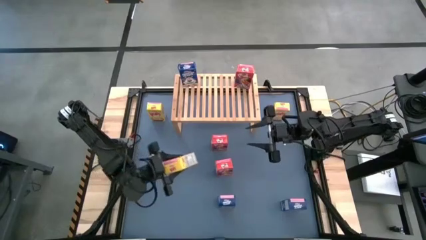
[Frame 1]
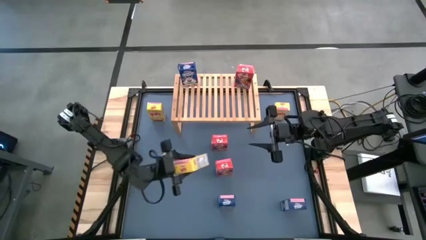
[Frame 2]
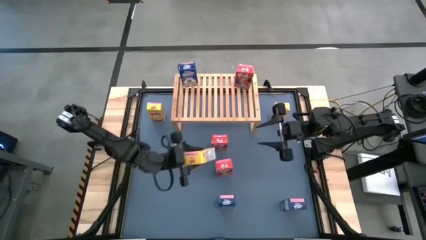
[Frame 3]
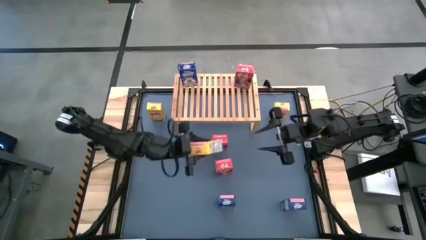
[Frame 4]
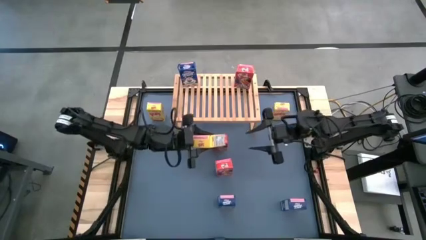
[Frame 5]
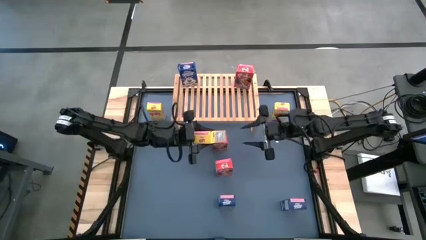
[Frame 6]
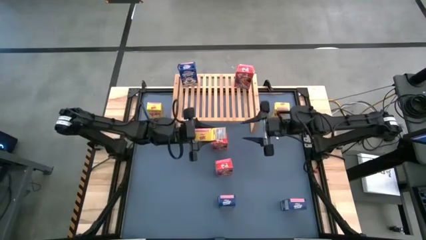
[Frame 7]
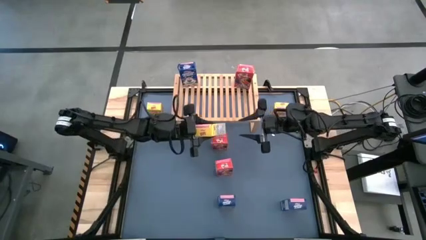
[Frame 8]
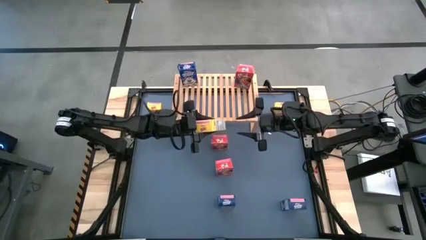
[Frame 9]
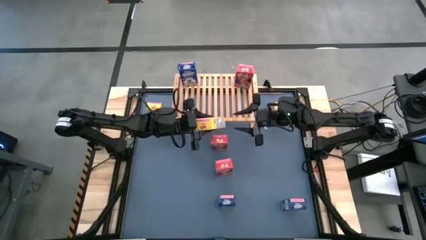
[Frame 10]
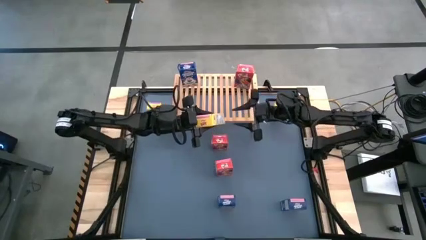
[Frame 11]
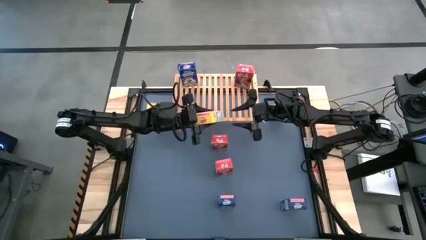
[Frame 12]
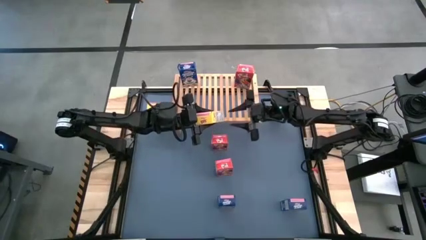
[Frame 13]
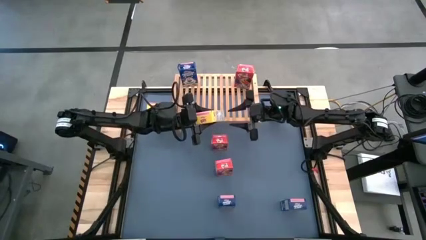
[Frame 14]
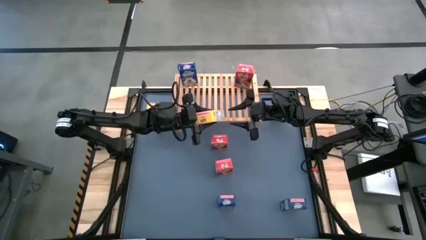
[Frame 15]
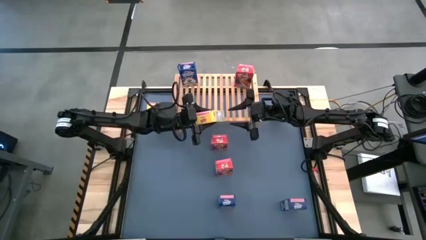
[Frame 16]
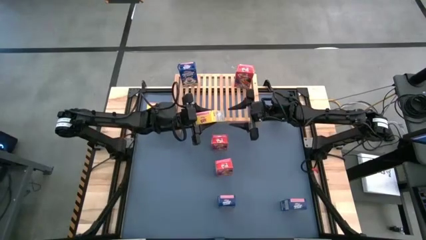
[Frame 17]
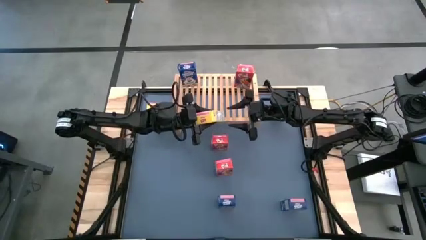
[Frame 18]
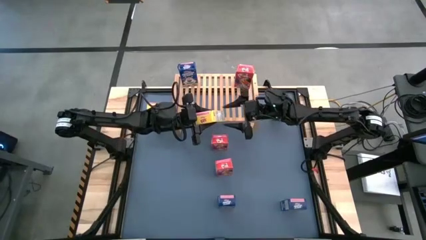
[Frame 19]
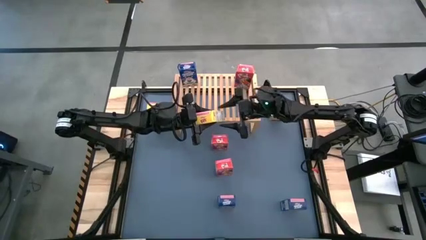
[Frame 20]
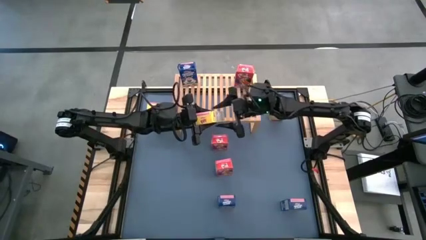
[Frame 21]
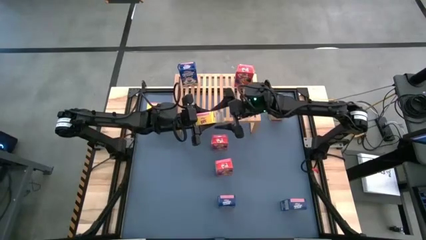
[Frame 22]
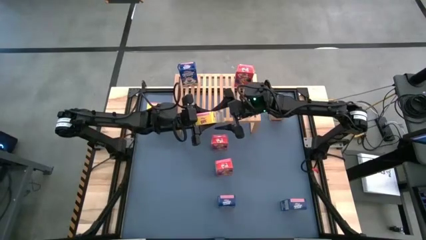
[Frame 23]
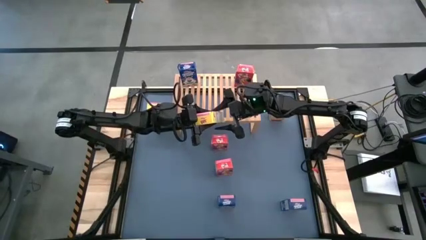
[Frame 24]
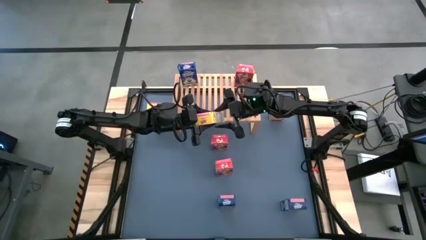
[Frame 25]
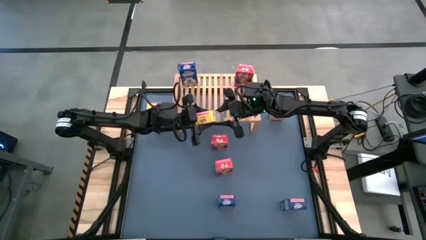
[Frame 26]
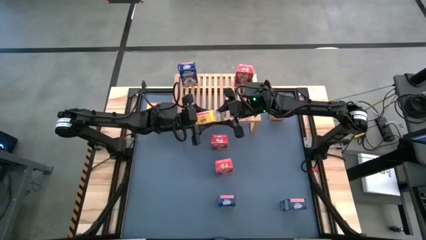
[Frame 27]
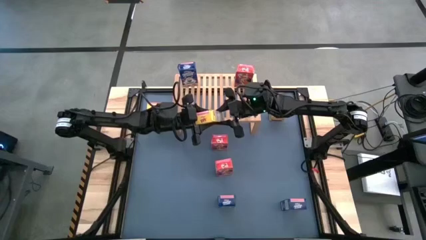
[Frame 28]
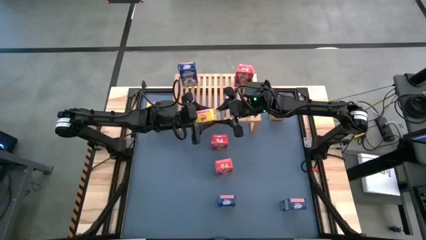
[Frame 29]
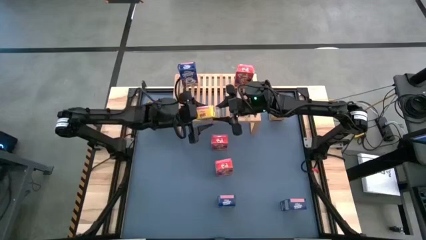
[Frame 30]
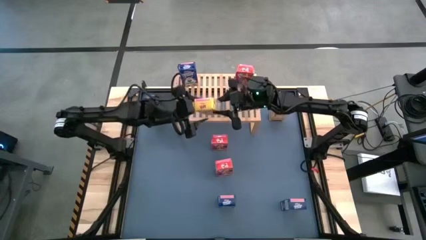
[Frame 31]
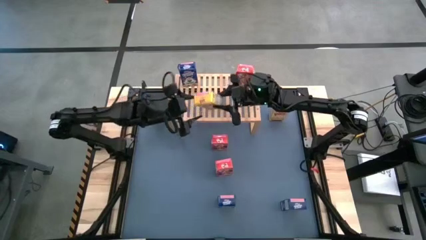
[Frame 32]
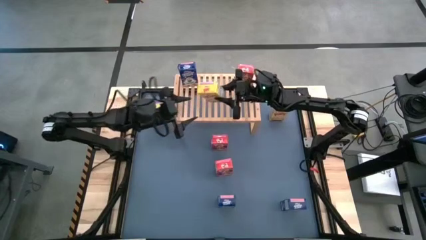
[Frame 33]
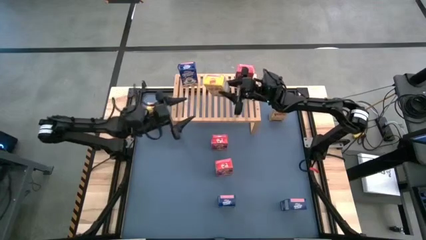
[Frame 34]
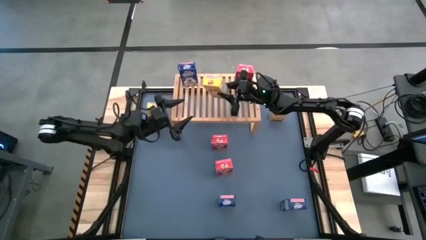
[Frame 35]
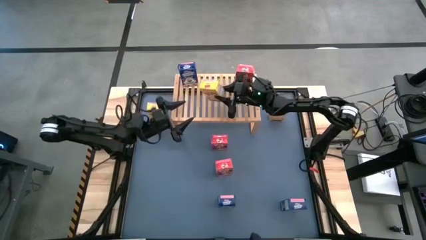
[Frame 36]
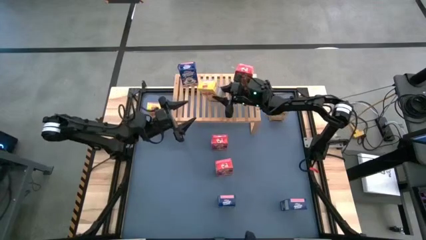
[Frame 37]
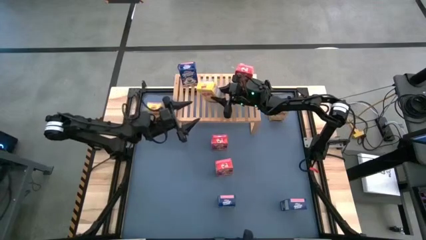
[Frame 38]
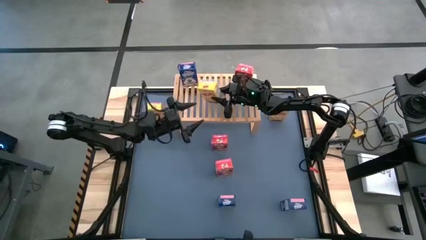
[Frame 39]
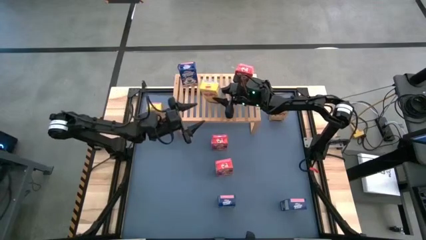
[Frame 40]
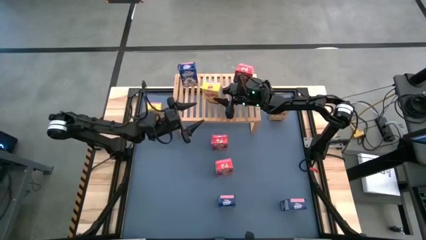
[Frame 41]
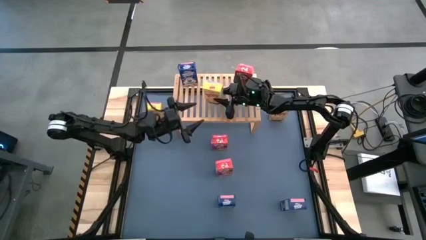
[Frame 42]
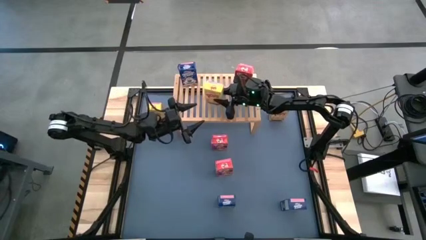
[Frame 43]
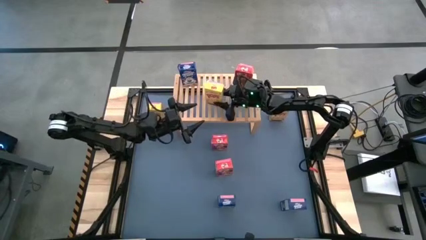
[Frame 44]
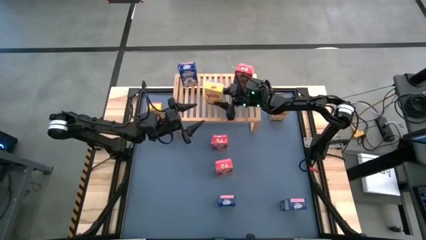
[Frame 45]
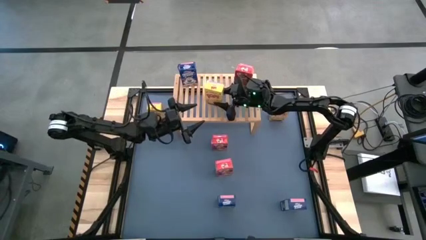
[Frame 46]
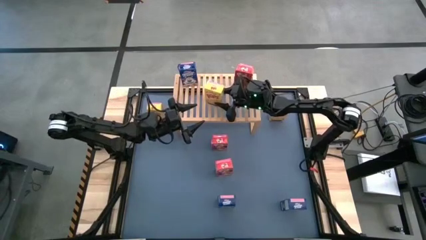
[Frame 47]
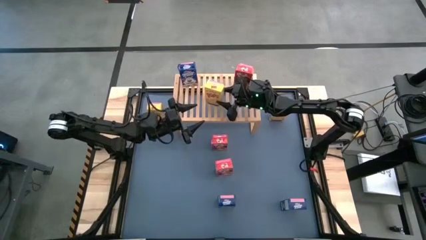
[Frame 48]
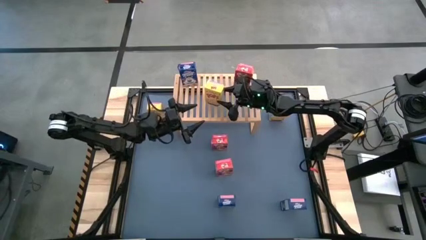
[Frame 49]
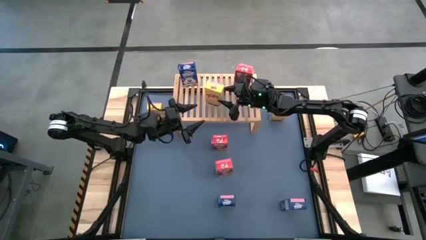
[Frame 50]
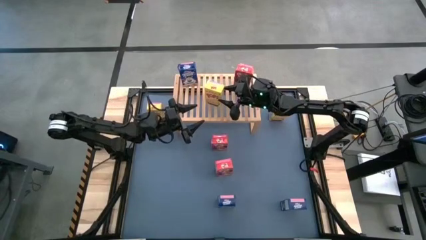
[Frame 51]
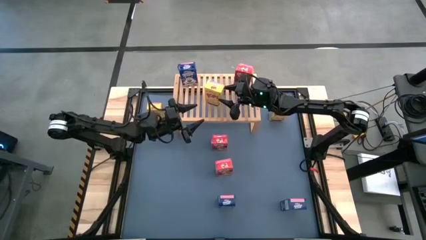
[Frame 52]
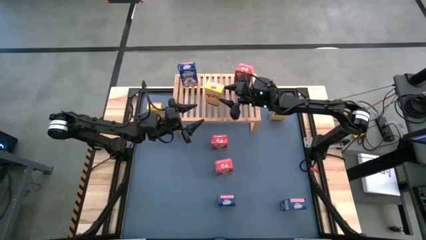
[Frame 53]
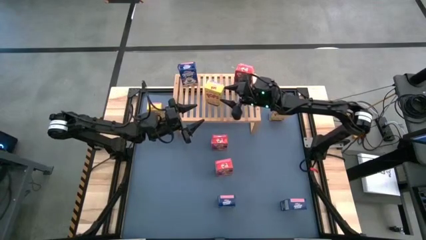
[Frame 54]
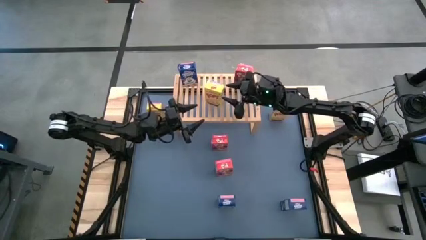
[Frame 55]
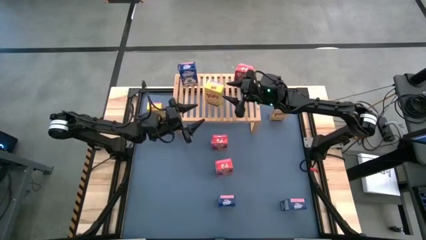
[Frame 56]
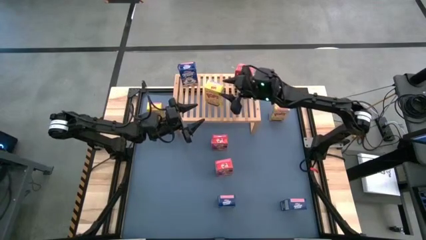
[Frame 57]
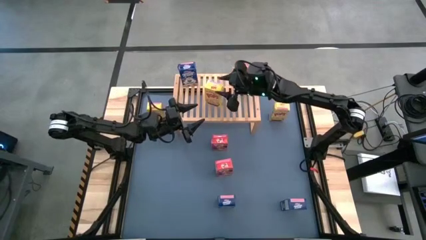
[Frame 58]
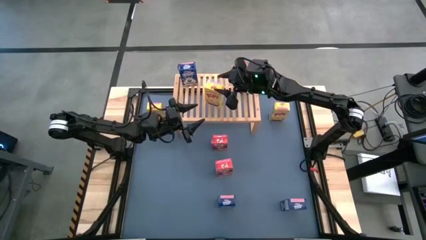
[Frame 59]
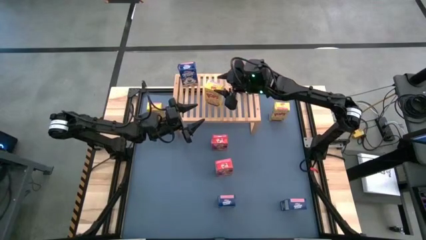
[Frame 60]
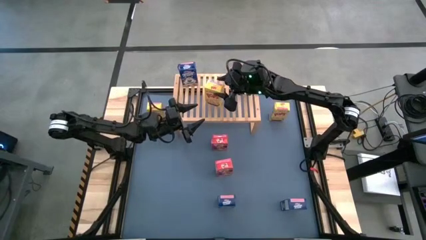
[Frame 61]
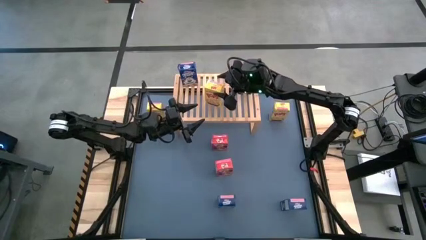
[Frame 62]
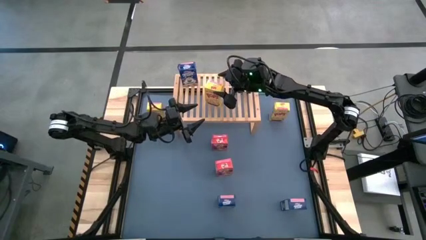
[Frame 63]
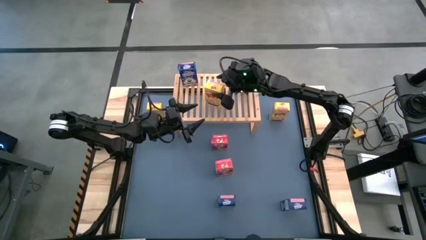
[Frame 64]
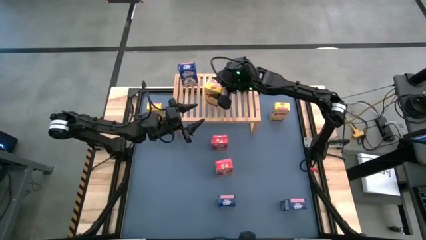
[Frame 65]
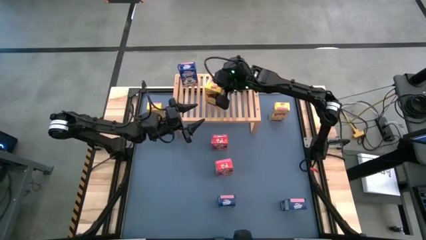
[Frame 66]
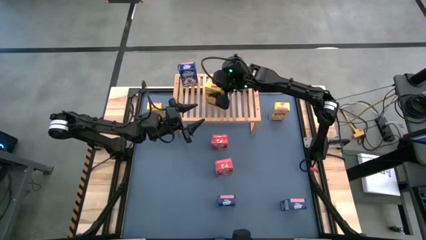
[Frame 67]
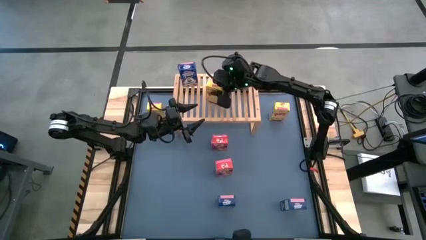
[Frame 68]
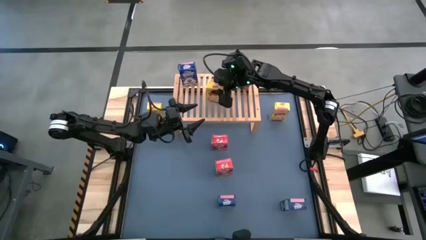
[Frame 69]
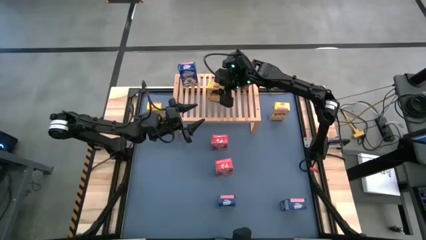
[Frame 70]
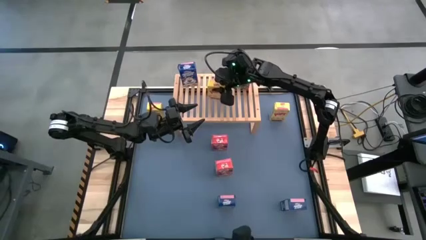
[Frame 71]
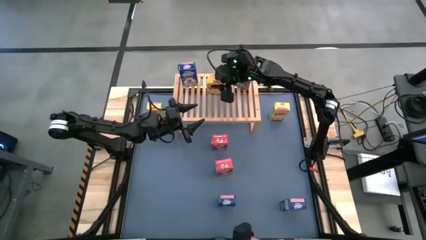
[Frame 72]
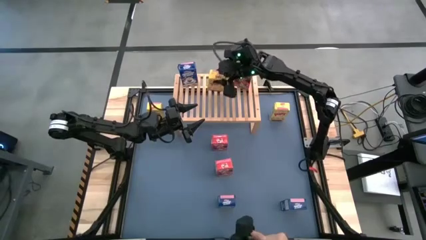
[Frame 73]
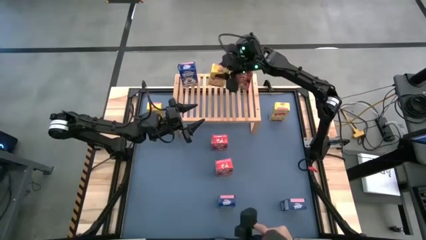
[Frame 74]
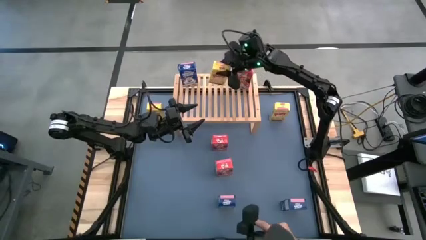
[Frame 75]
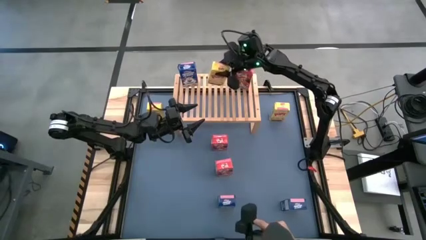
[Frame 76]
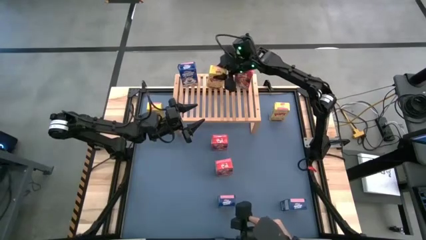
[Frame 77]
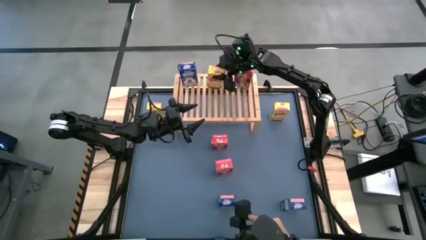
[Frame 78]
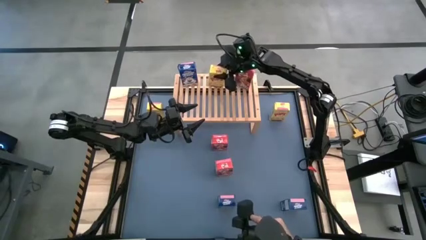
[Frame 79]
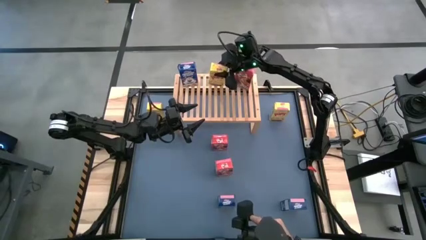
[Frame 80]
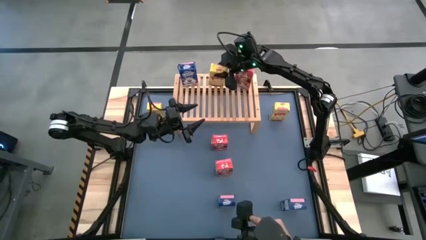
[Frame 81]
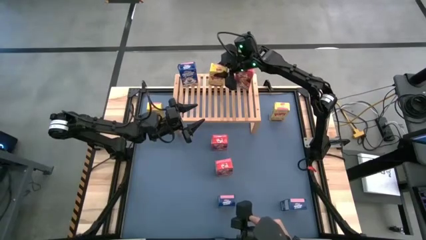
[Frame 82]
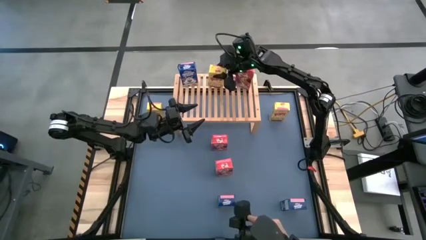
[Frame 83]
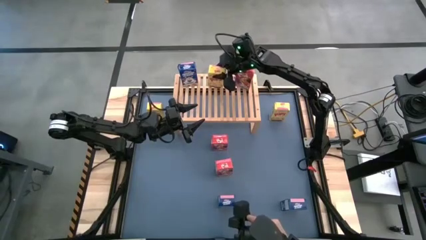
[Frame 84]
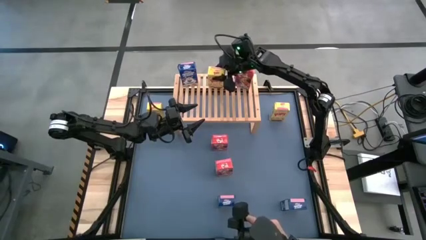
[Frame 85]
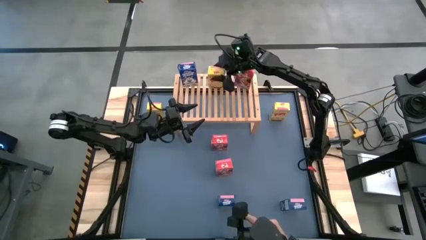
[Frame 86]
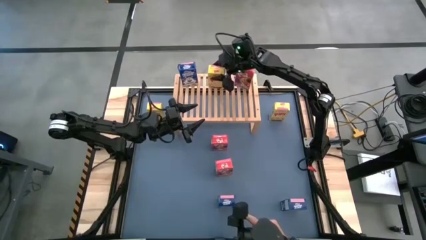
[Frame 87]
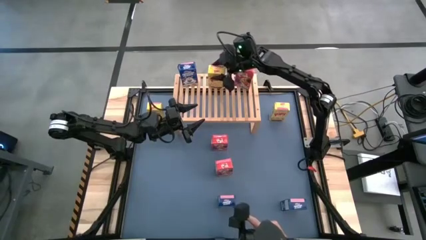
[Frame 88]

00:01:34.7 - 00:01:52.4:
Task: Stack cereal on shelf
Put the bottom yellow cereal box on the shelf
